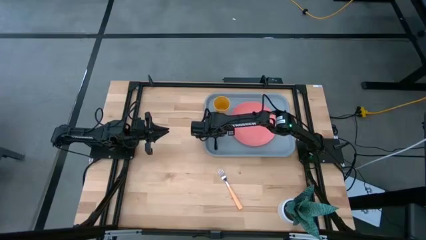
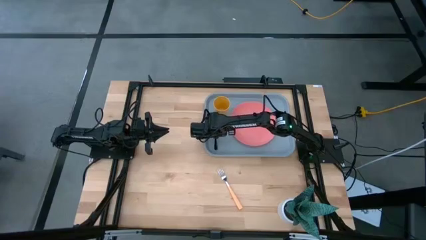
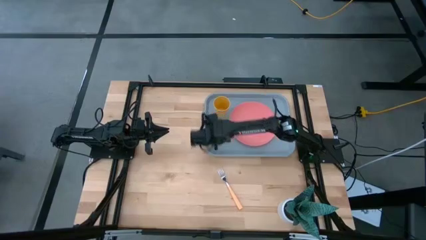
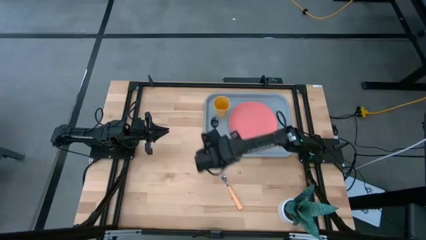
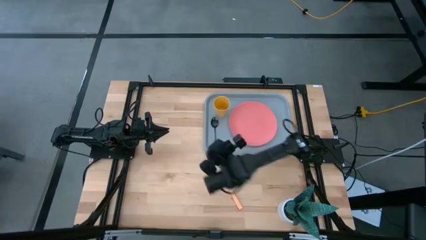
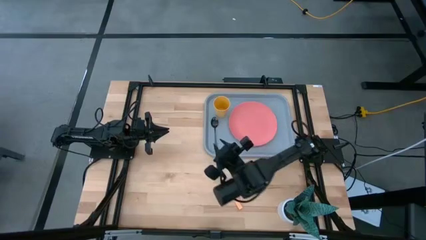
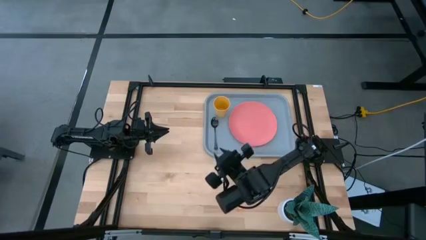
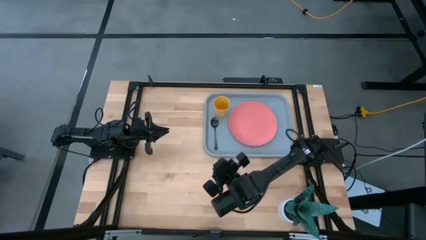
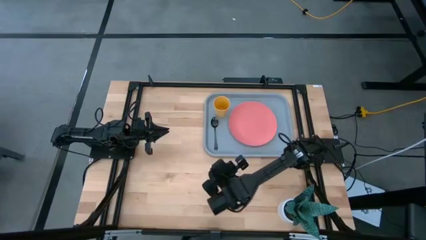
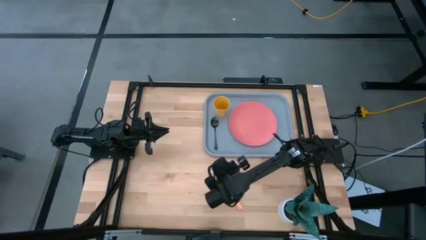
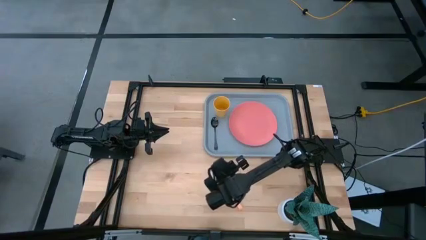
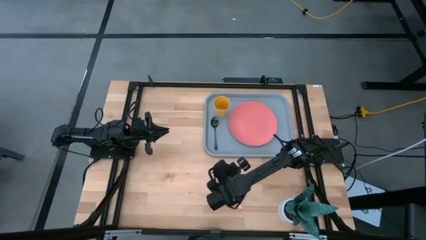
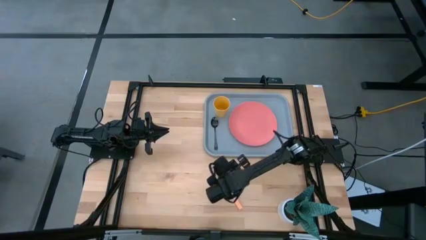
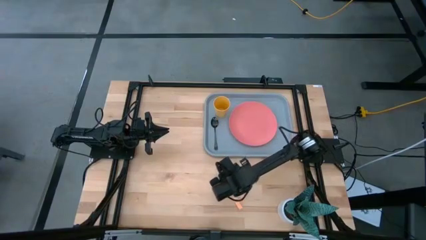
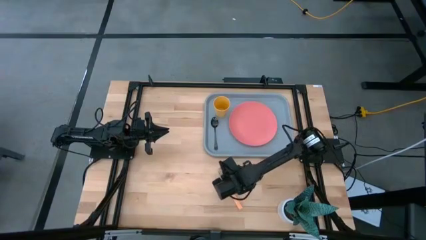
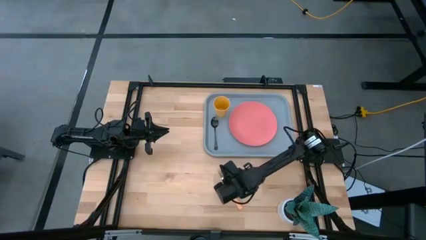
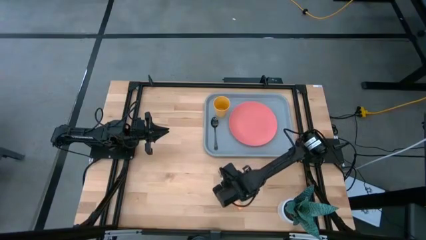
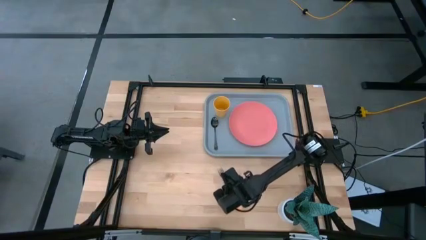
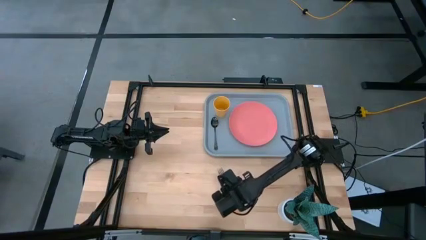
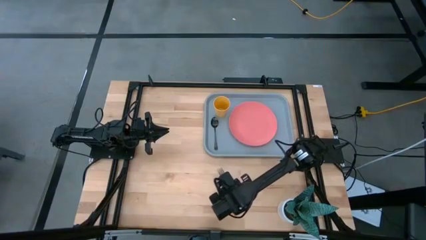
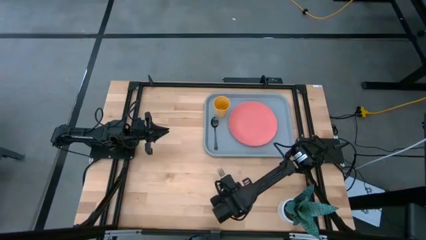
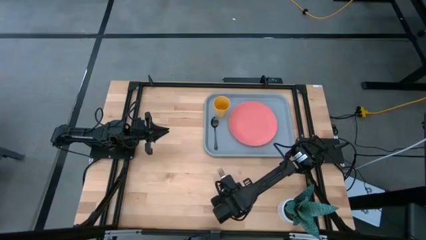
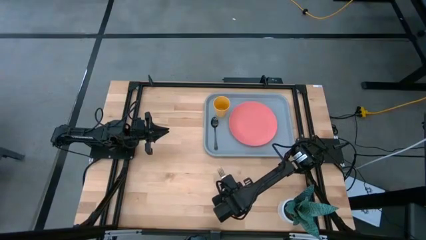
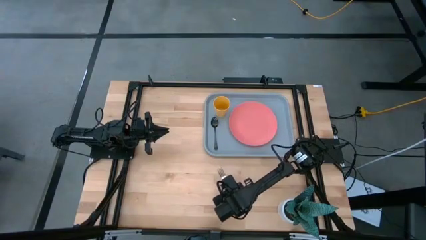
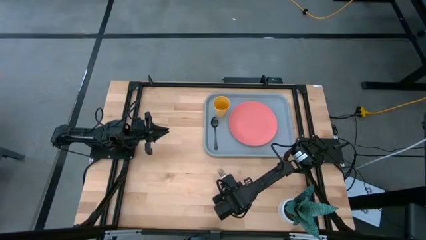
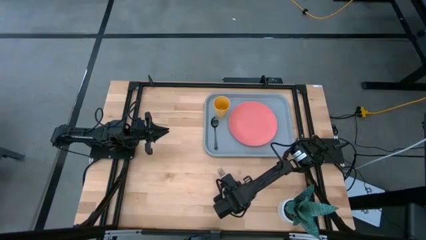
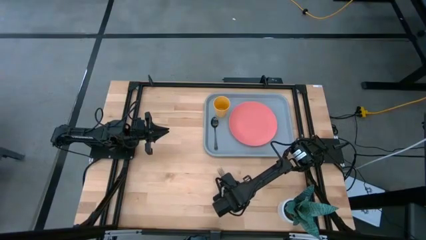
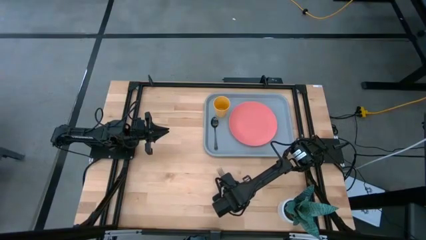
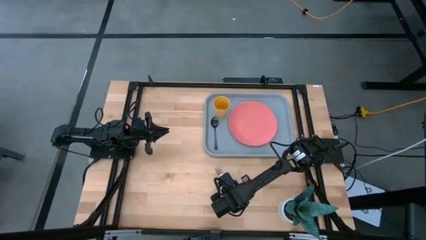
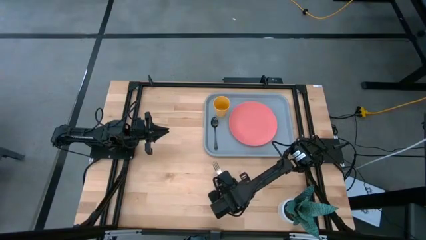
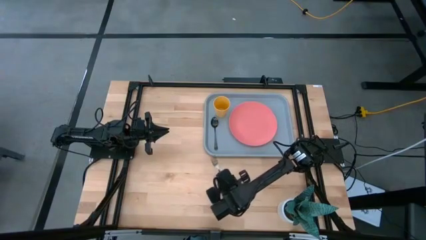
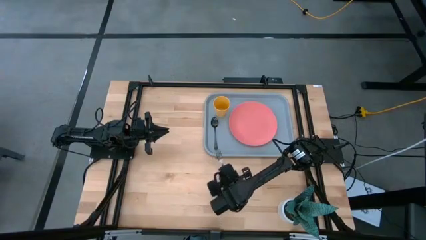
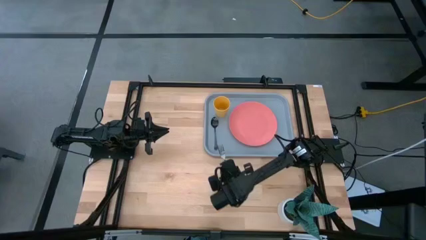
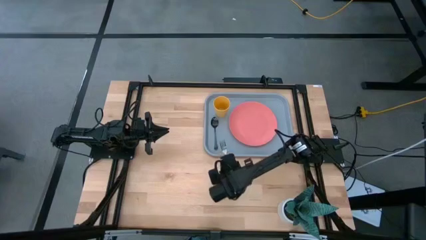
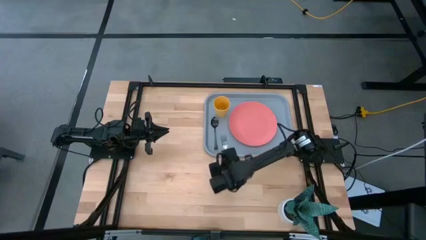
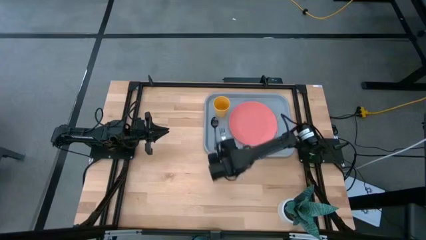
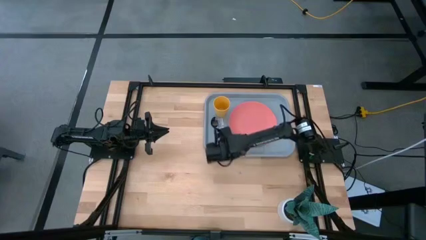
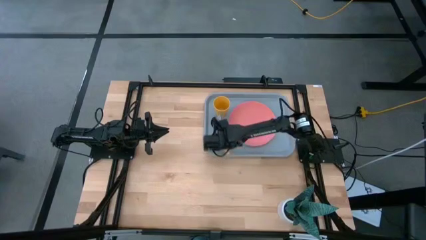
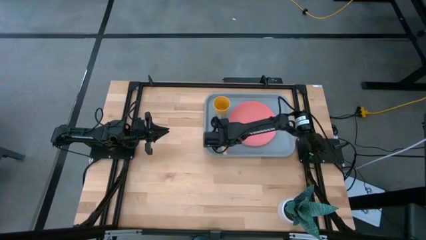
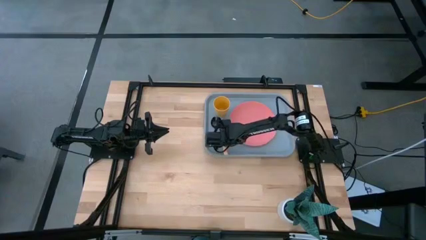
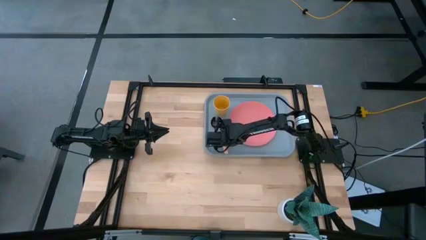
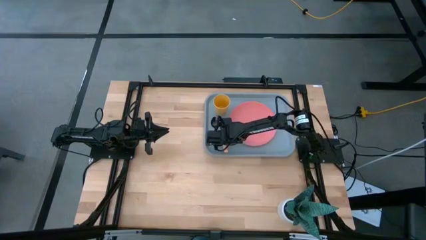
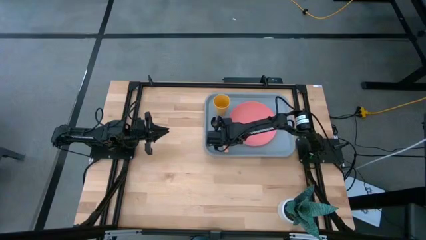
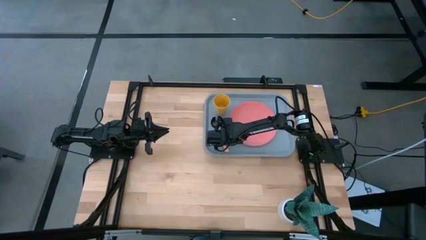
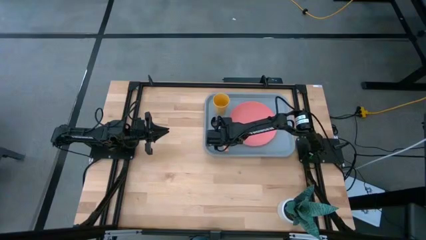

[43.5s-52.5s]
Task: Pick and place plate/cup/fork/spoon on tray
Put the yellow fork on the gray tray to the right of the black spoon

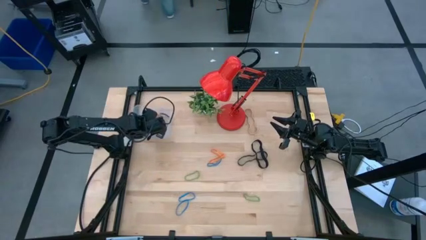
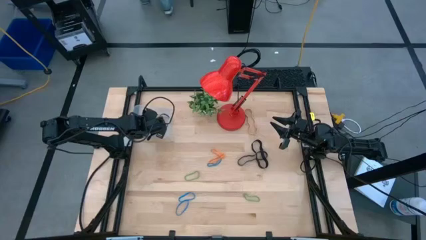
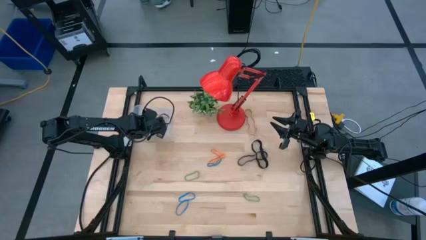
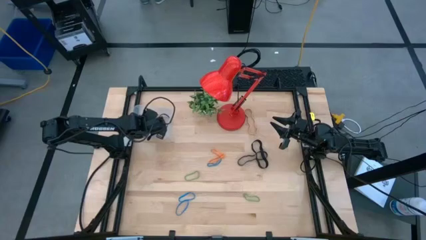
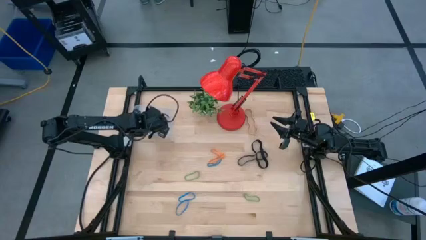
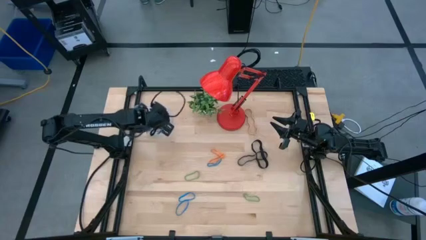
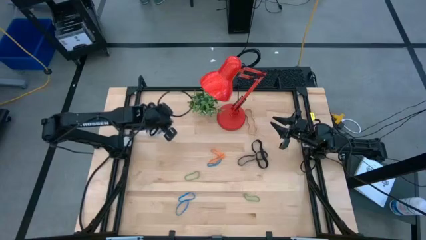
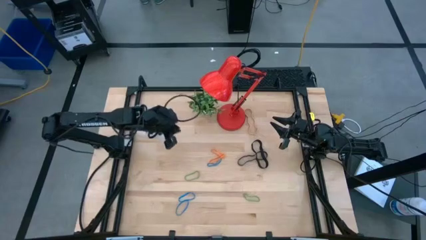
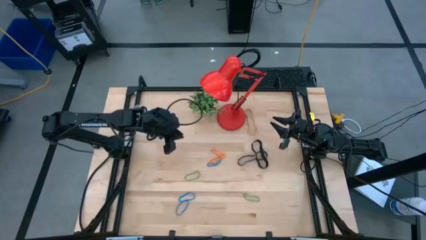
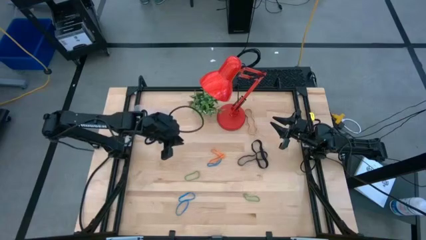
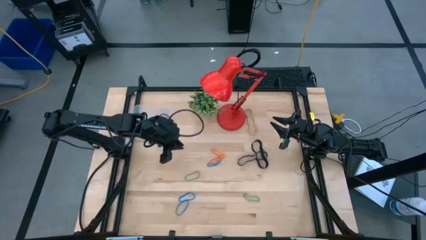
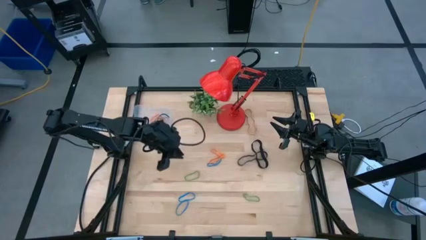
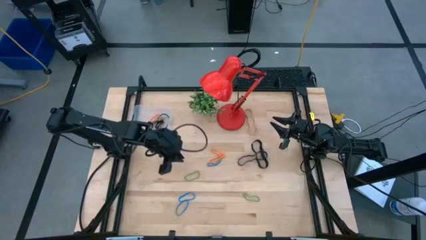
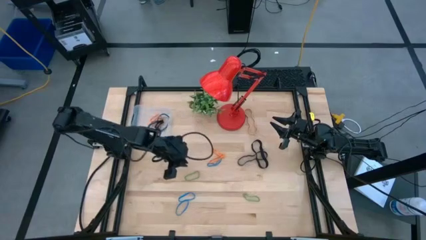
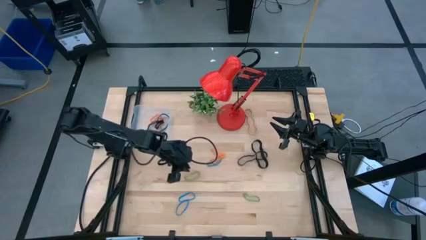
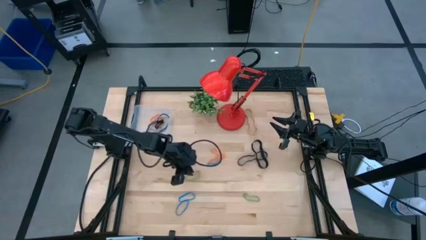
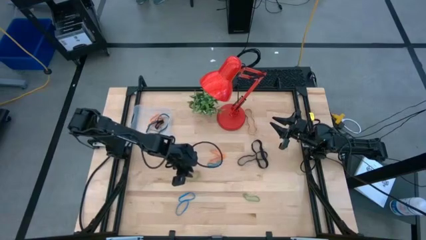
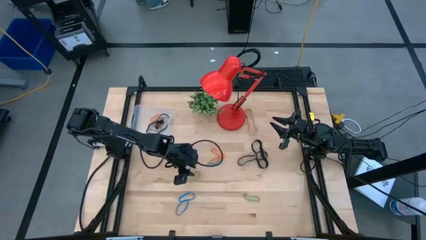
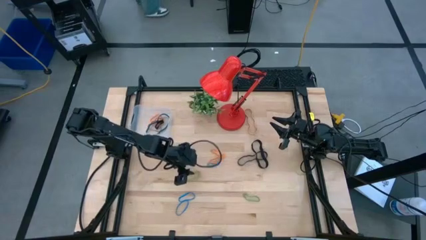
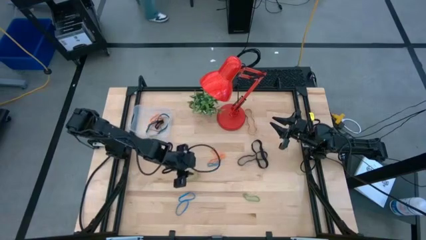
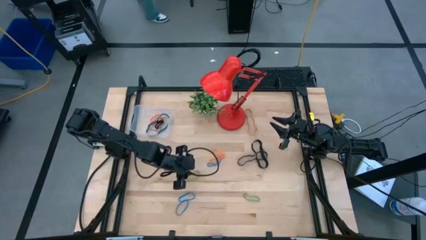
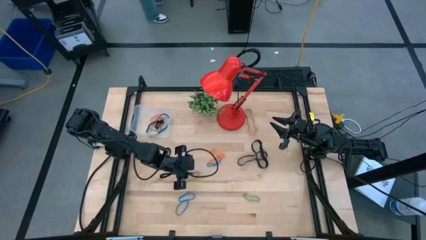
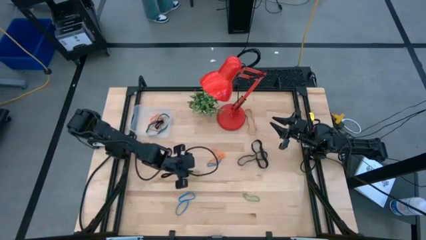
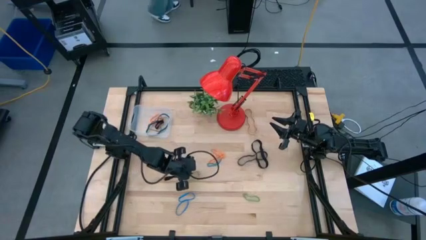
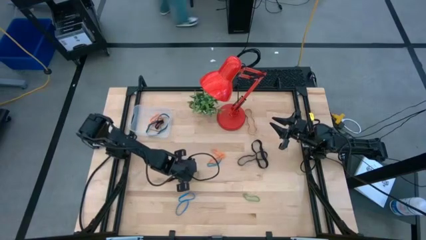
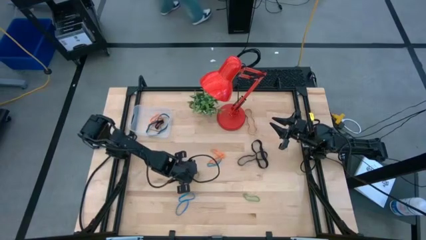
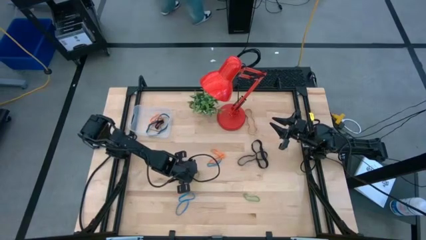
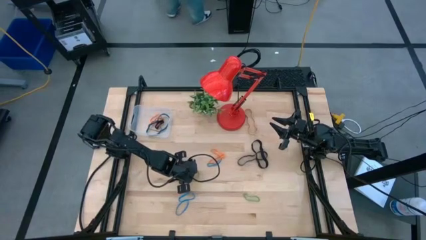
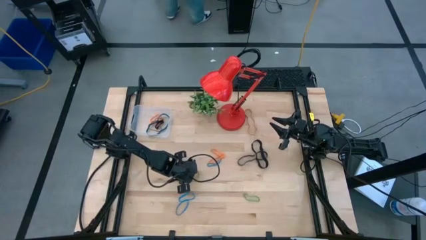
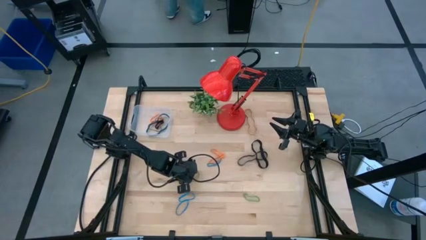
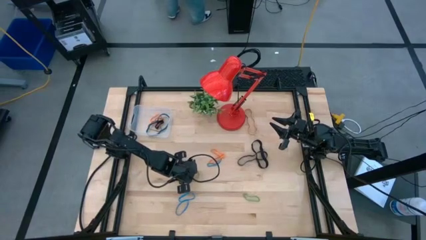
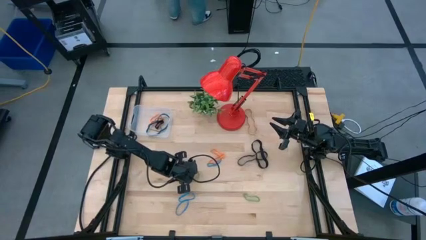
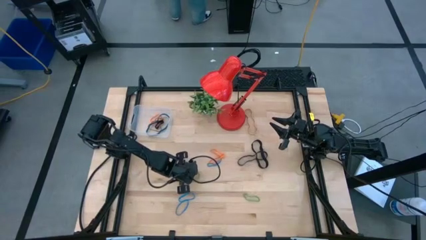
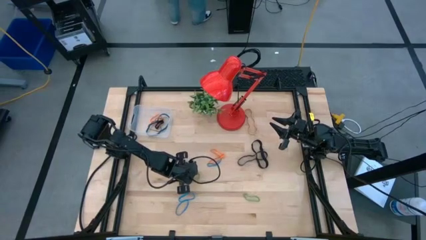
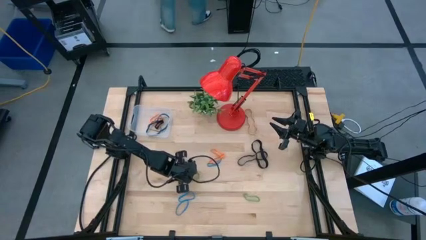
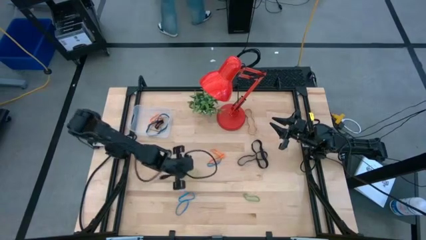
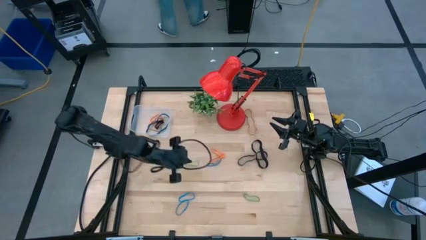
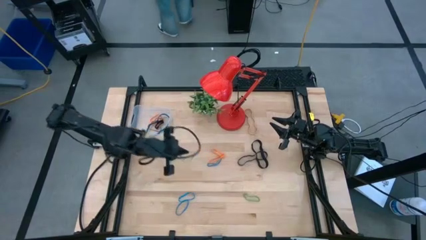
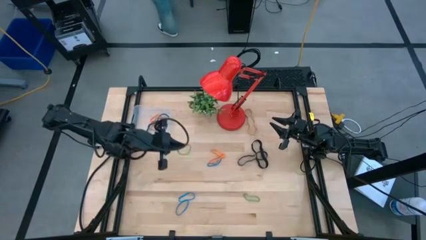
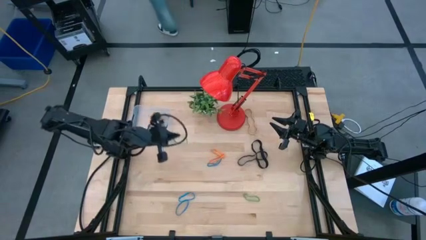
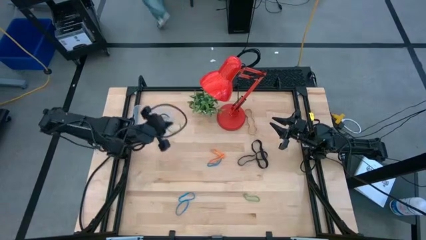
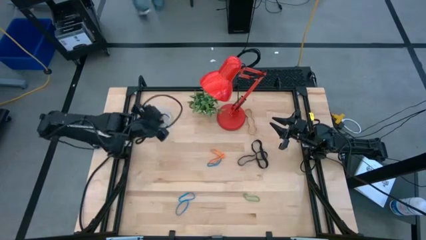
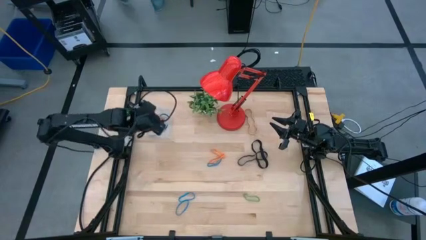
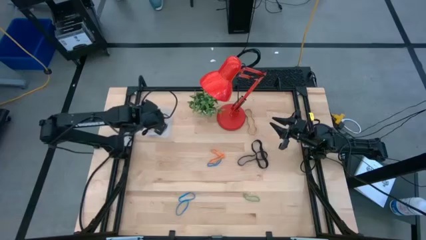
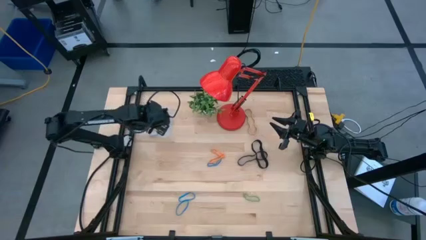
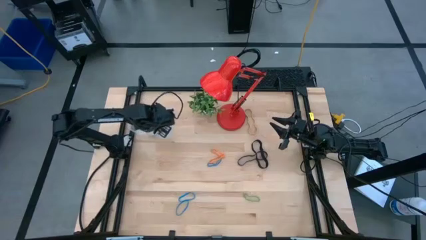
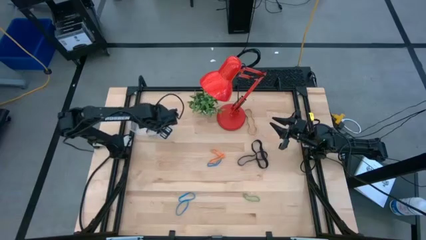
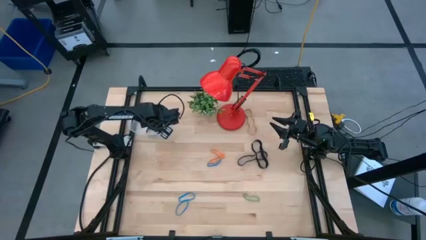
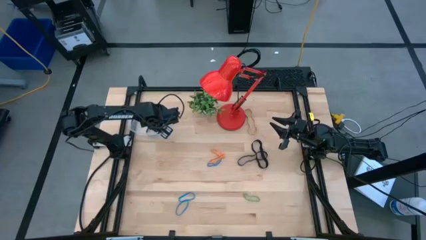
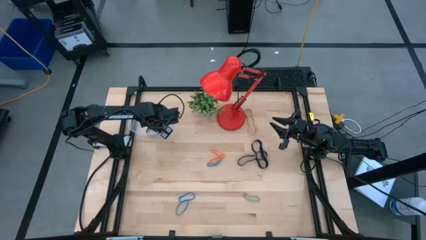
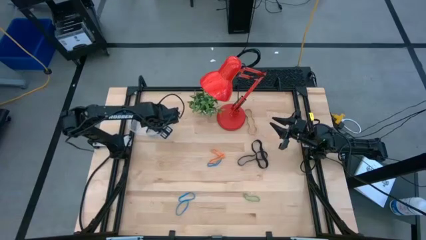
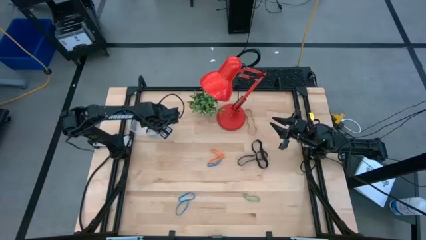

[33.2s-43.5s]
Task: Pick and place rubber bands into bin
Put the green rubber band into the transparent bin
